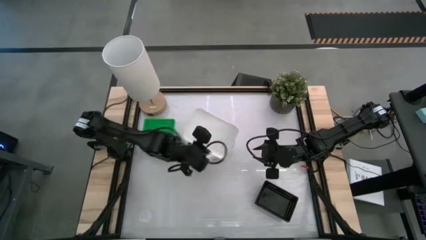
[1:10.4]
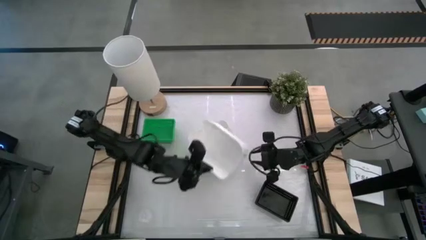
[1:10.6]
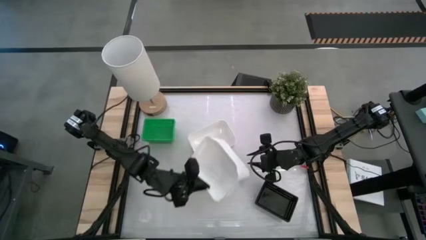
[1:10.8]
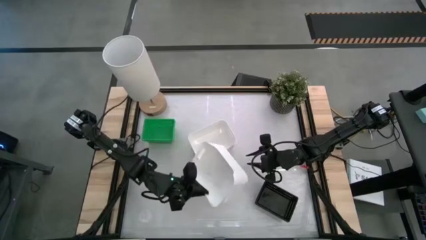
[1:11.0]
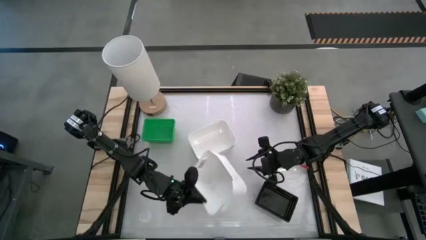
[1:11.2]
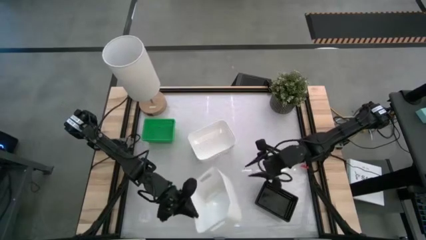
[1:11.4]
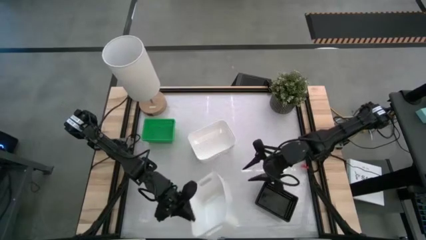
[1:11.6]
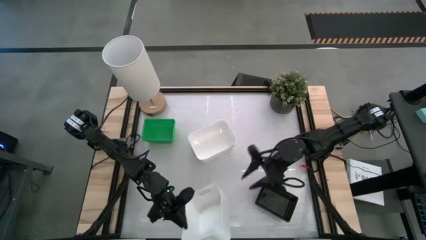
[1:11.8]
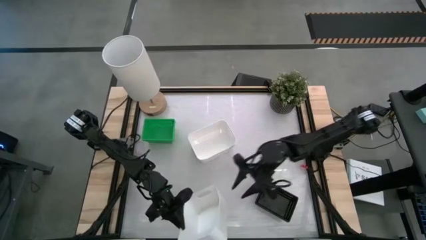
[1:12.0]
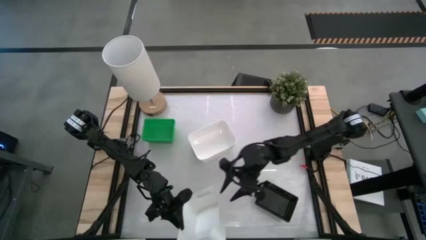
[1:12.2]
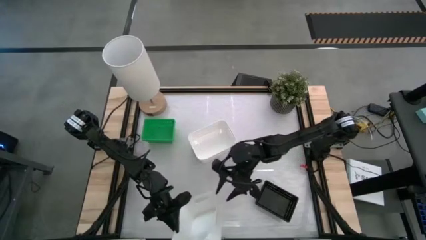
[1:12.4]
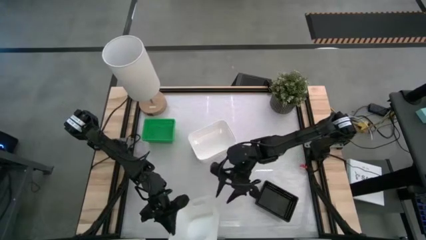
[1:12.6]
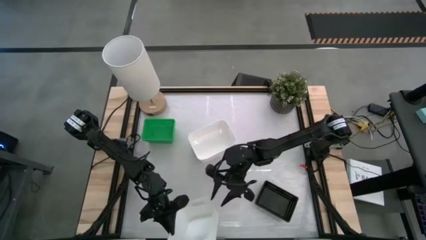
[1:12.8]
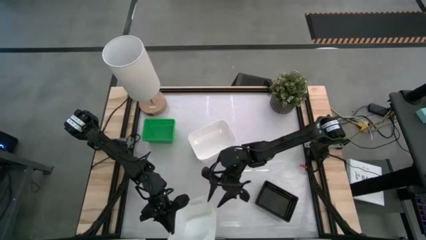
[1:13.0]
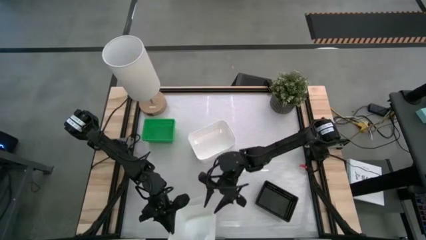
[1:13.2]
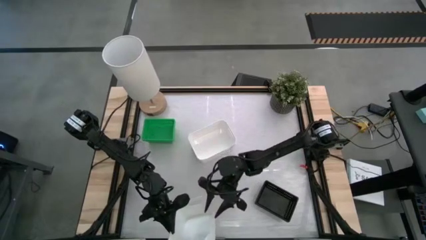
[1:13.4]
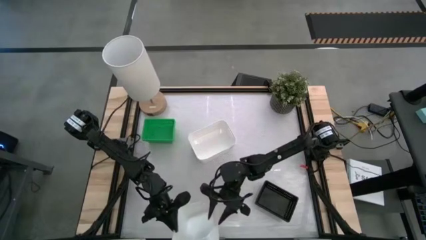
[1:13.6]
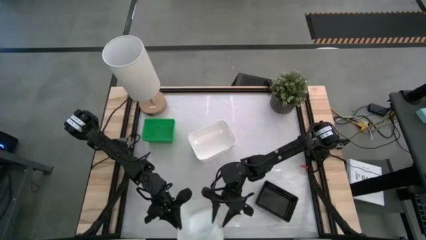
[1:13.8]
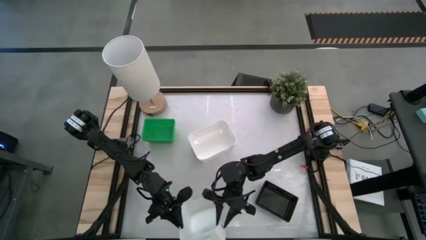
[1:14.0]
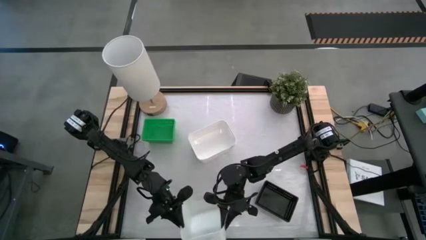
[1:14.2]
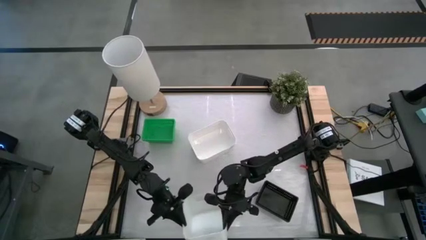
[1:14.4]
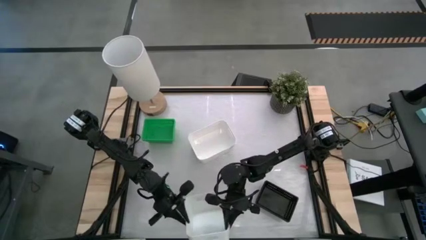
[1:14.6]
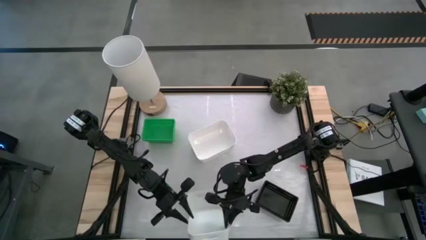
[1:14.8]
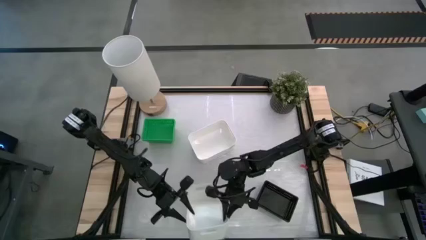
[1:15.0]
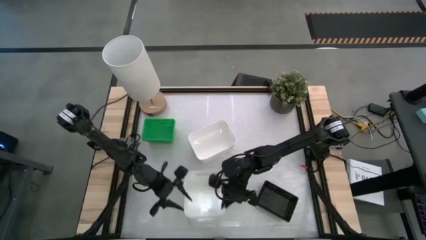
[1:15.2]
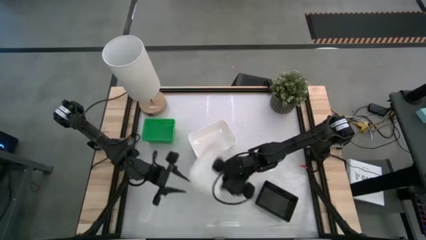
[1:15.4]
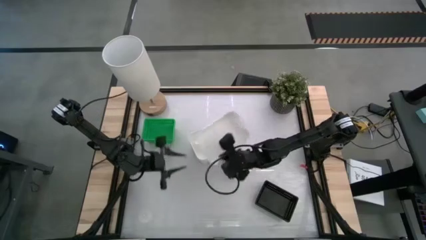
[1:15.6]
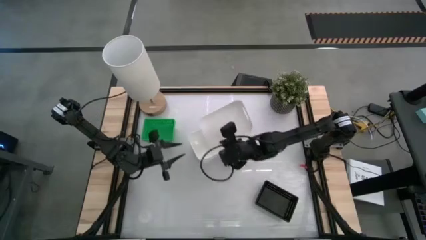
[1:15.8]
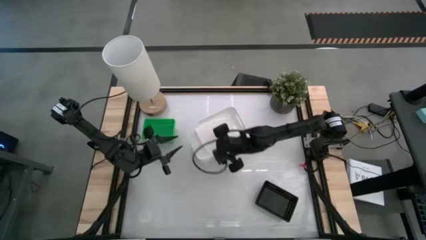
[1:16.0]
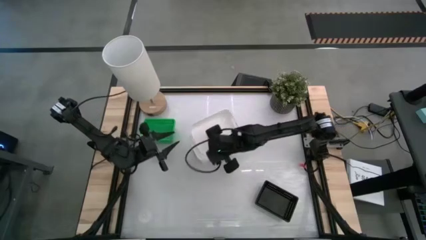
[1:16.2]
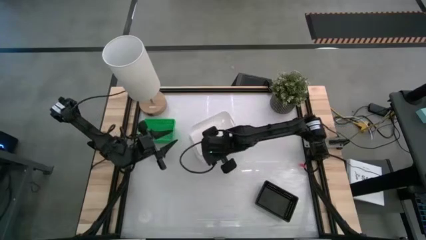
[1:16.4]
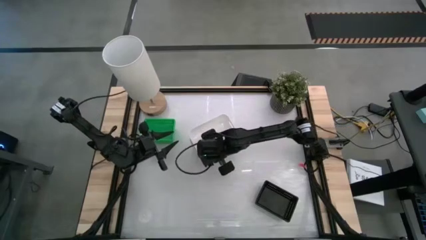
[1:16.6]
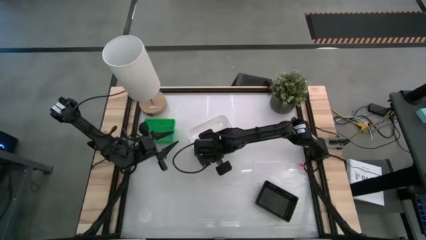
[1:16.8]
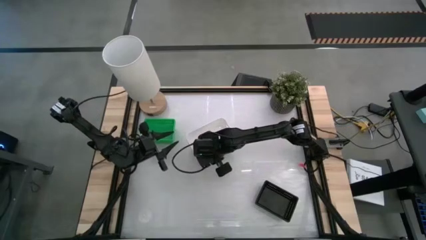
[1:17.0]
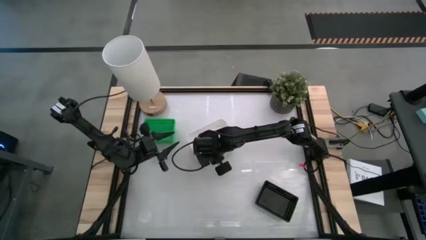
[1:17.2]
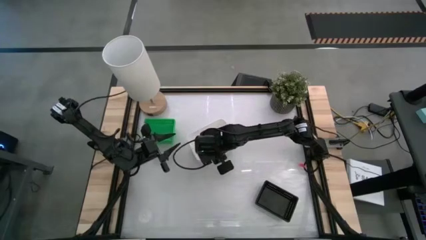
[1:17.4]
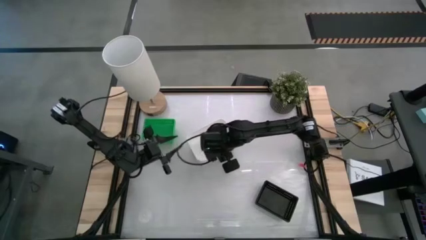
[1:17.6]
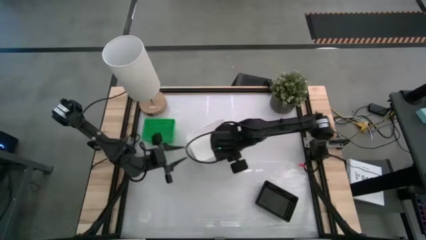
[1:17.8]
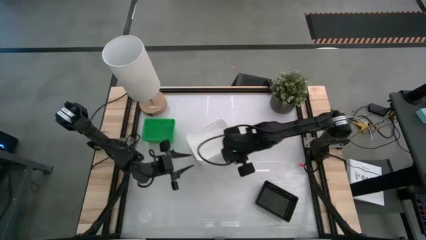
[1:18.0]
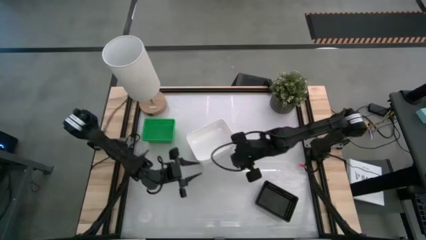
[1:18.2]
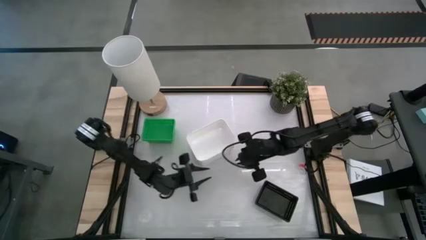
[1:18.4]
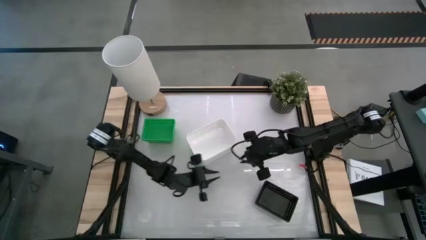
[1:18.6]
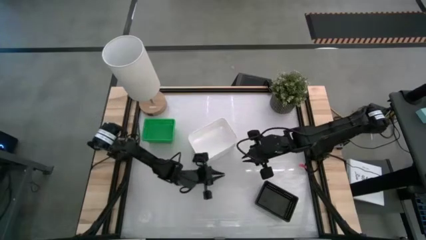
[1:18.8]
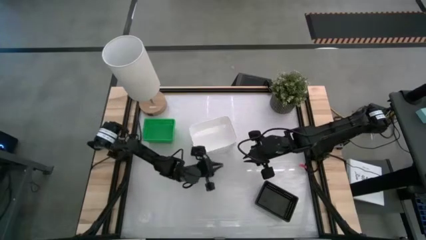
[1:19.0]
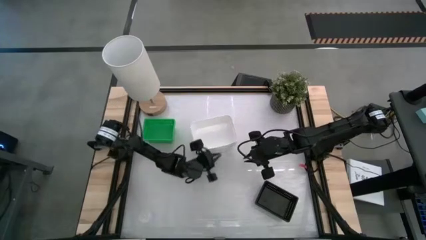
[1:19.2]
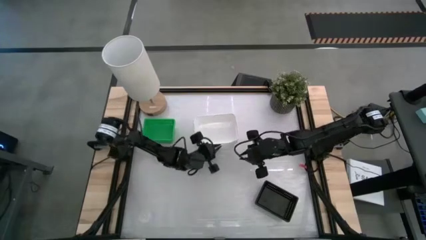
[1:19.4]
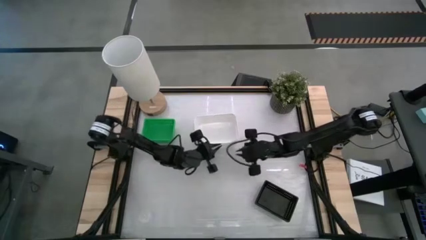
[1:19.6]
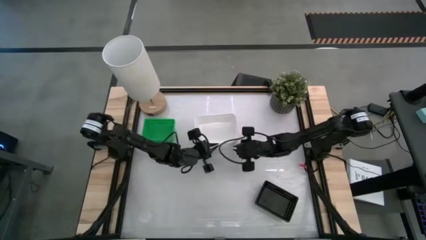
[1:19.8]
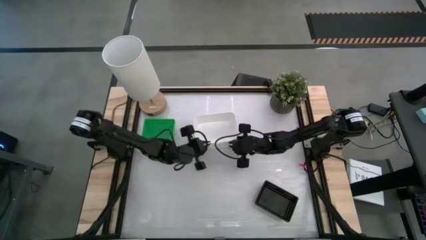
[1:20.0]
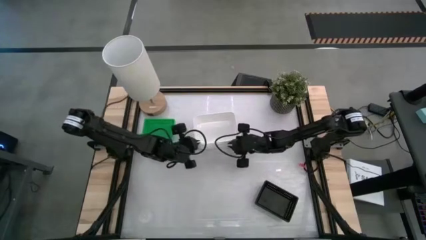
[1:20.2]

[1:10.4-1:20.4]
Stack the right white bin on top of the white bin

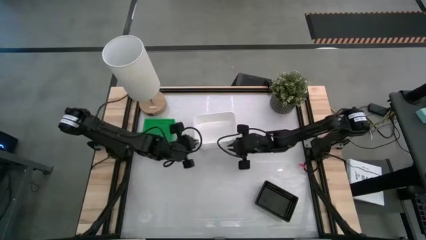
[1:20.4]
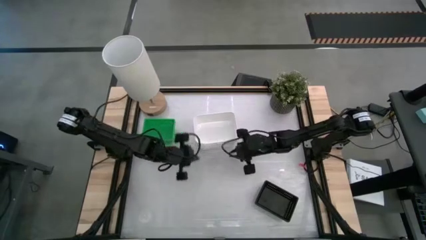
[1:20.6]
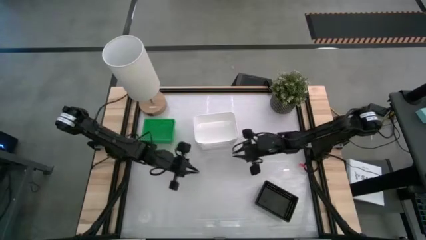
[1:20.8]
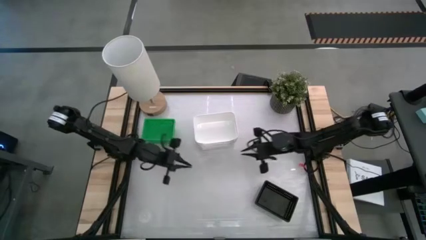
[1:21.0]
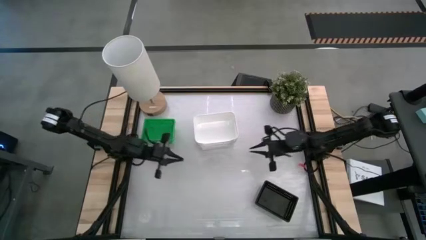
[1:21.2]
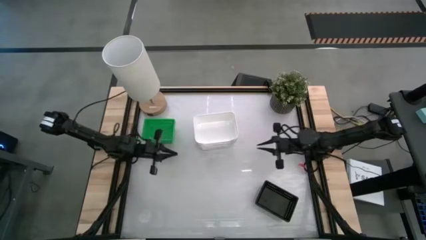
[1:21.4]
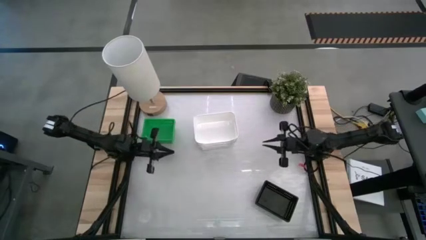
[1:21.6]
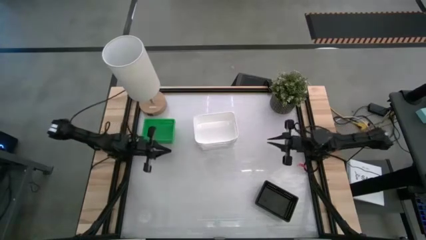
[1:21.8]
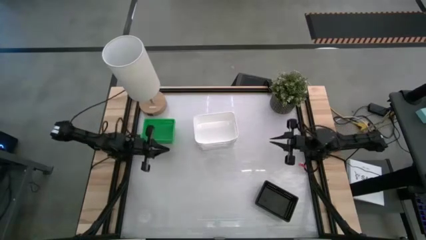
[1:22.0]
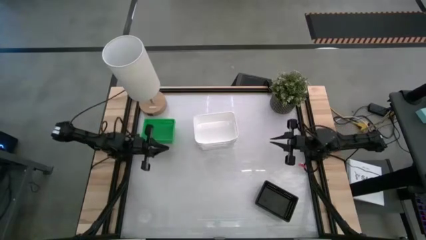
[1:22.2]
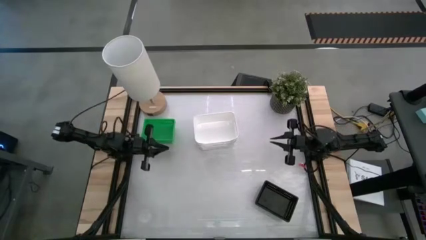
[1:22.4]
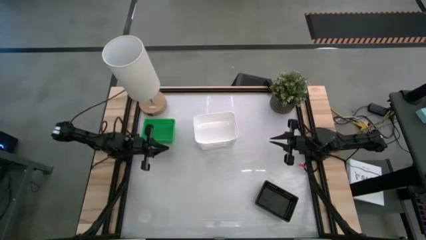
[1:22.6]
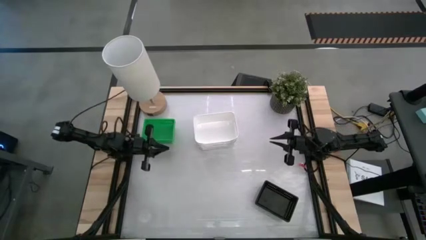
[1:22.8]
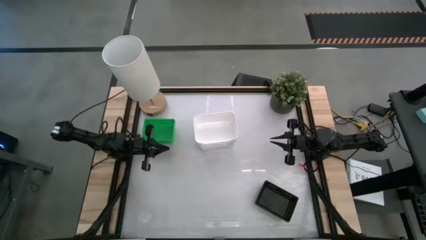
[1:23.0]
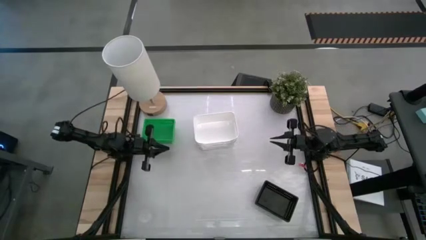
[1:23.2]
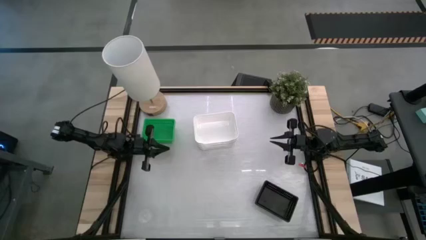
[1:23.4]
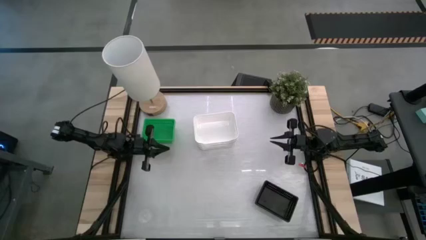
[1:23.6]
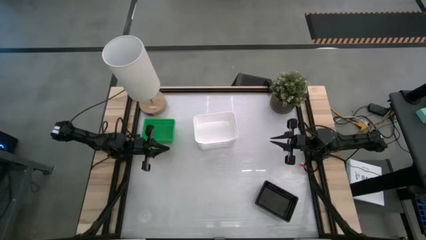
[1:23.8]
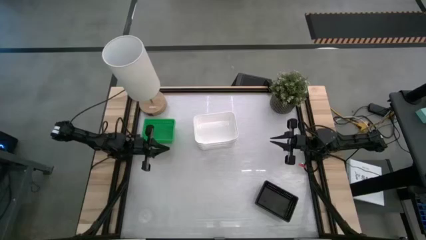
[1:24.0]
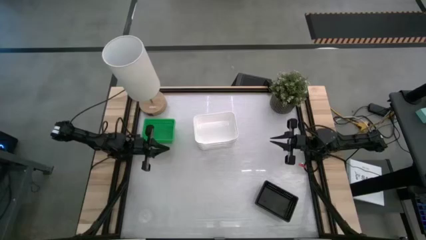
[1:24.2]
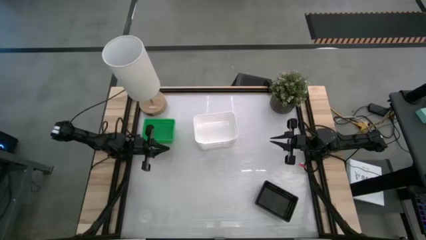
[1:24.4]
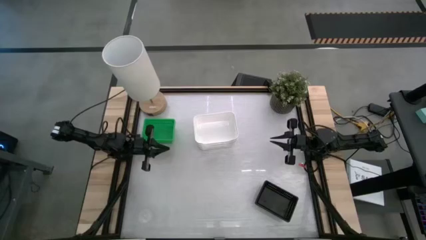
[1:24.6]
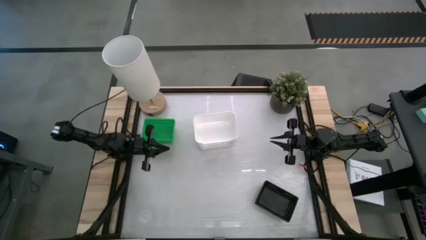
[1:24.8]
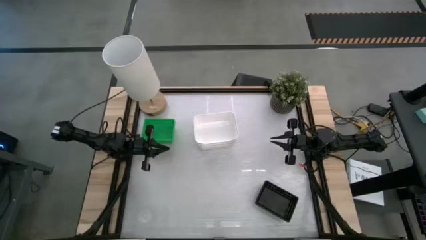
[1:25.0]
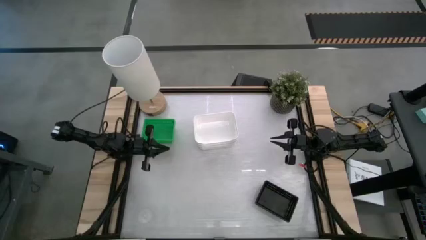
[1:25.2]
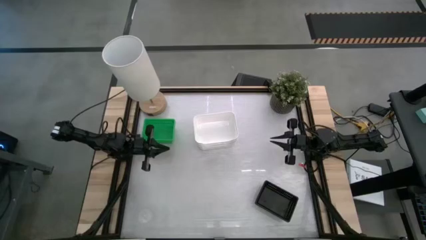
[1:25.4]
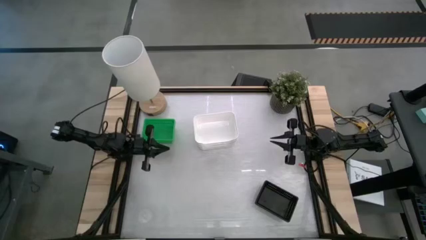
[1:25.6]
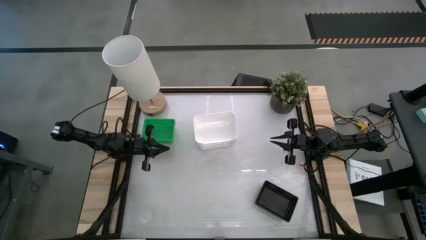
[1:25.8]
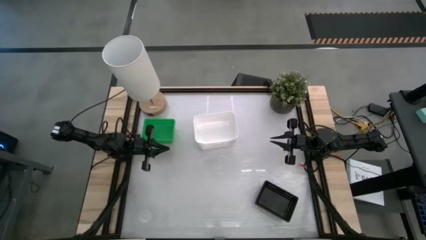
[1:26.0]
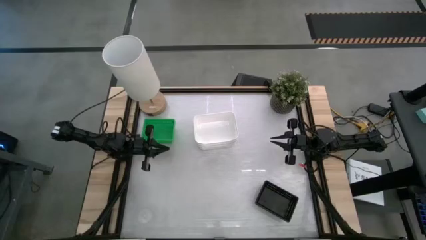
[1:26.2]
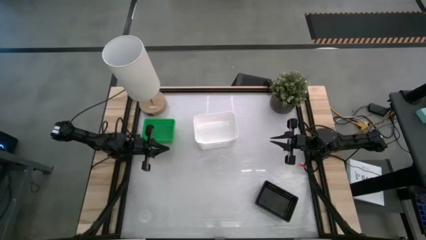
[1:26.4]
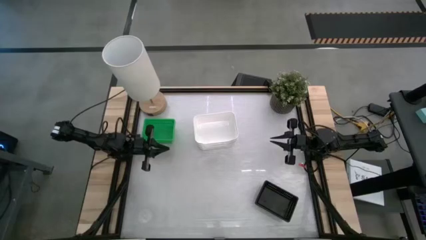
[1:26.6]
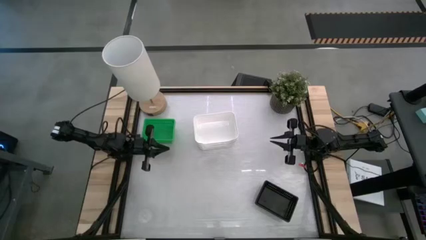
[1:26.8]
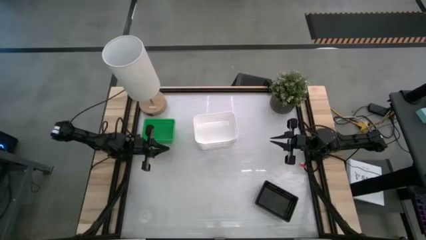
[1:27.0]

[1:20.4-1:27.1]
Return to Home Position
